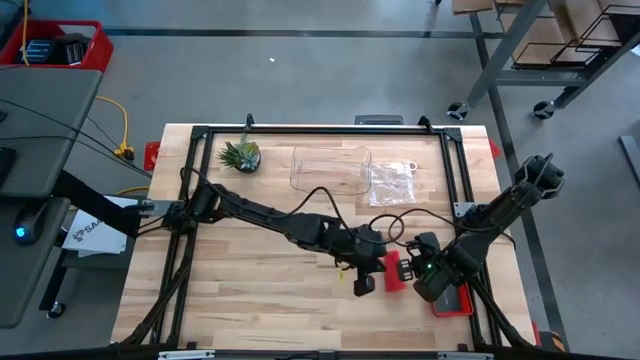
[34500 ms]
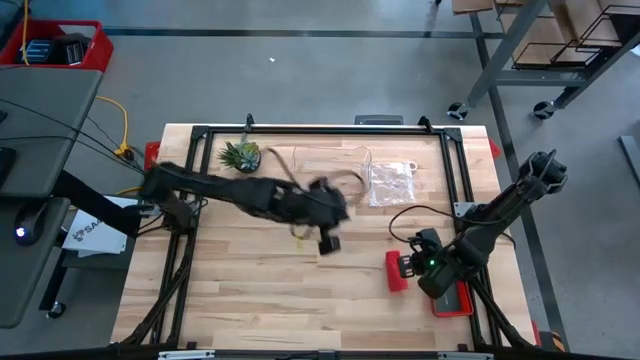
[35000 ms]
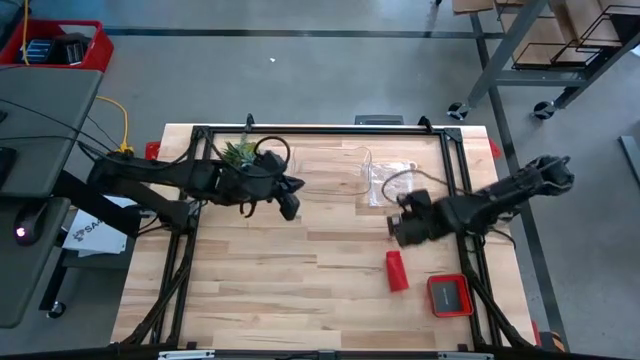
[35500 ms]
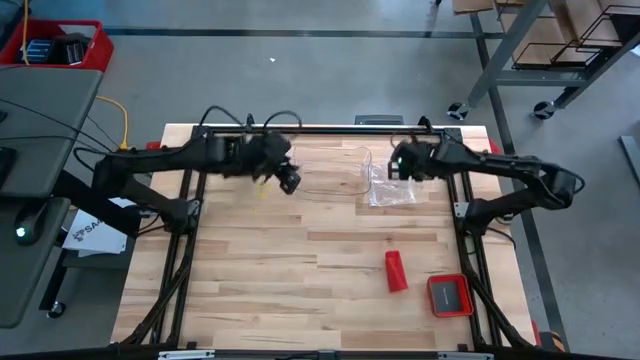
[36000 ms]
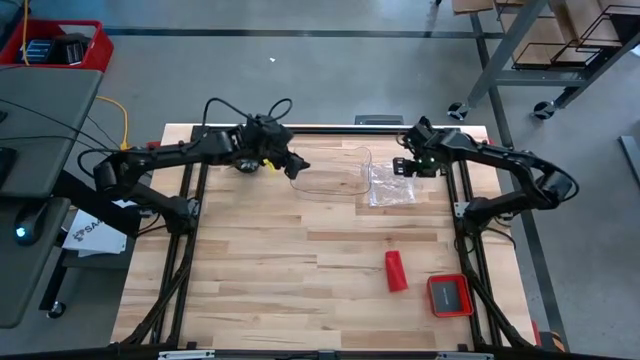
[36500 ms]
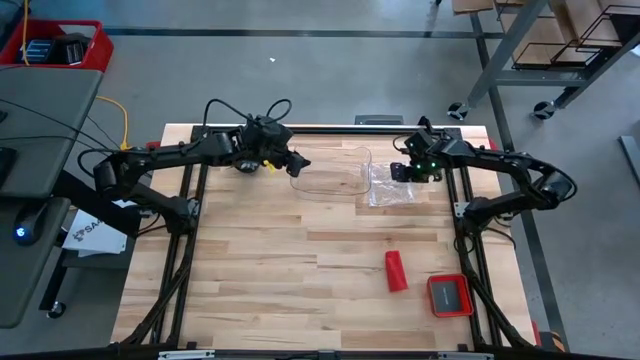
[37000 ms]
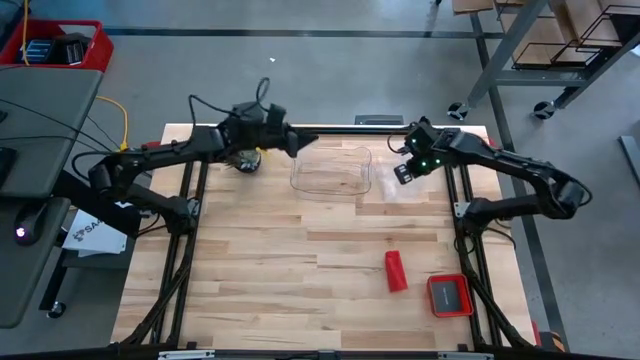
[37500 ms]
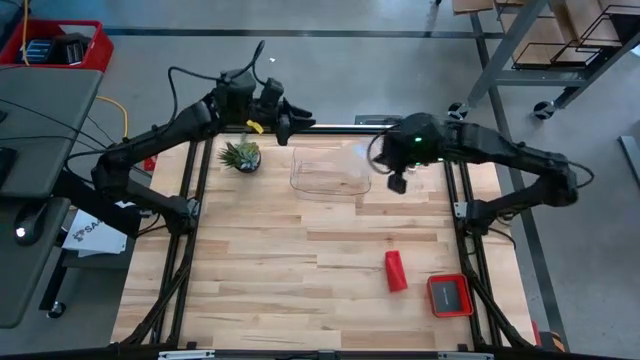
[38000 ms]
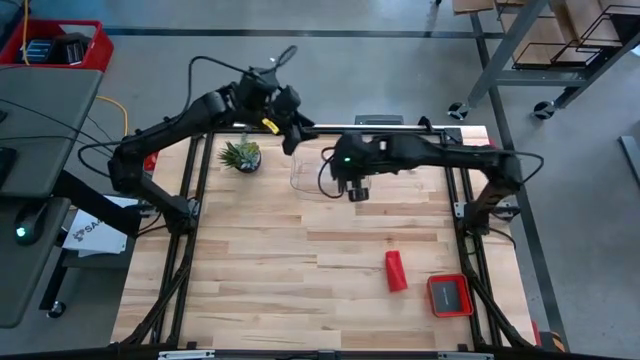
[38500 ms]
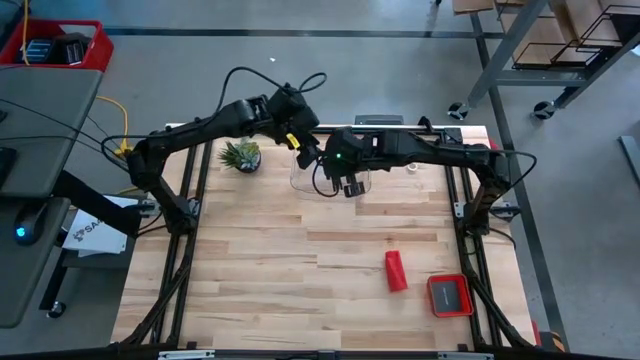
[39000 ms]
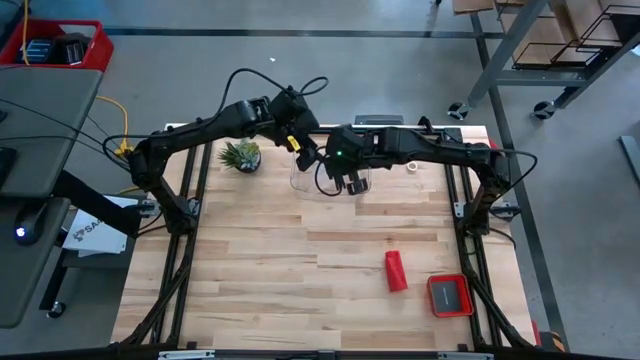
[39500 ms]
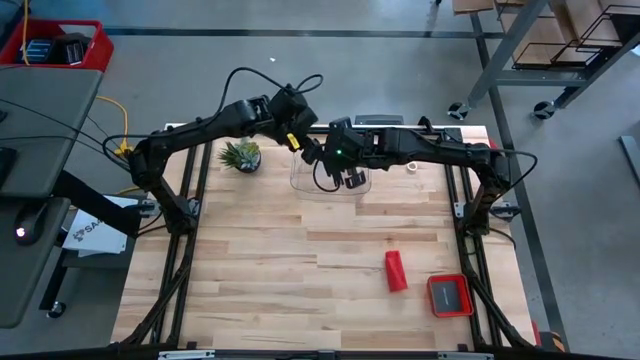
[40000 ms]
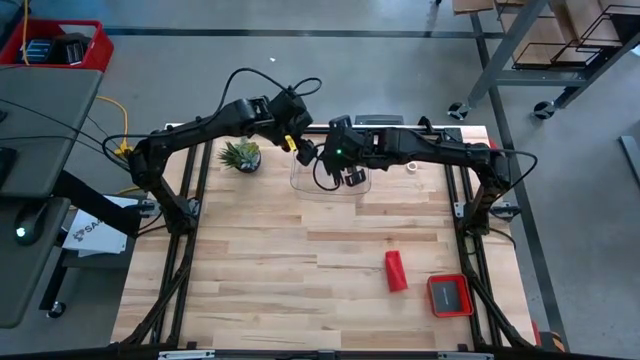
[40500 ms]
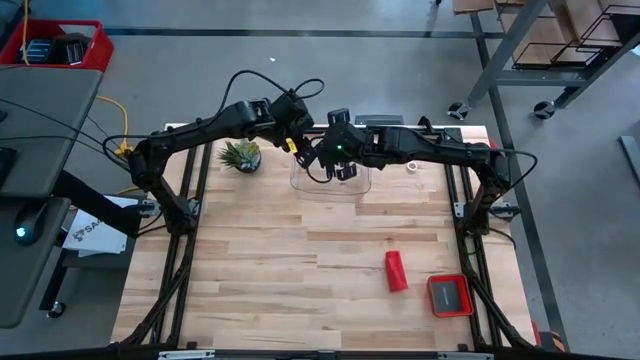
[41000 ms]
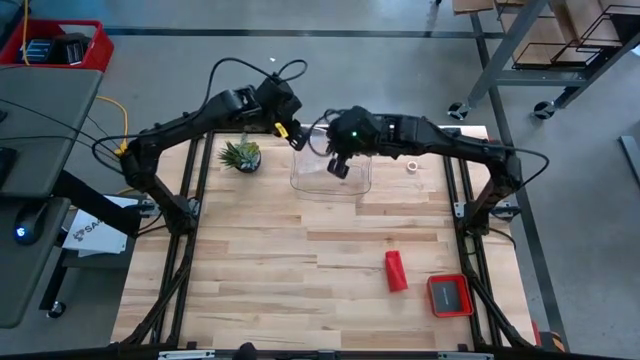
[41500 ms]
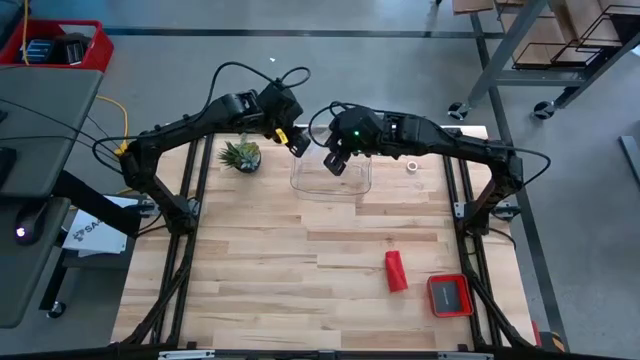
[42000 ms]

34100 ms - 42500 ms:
Task: Roll bandage
Open the transparent zip bag

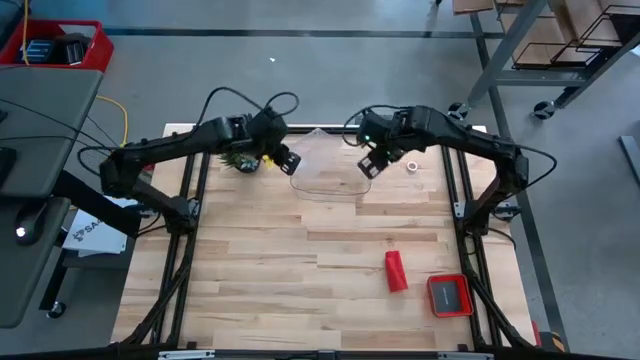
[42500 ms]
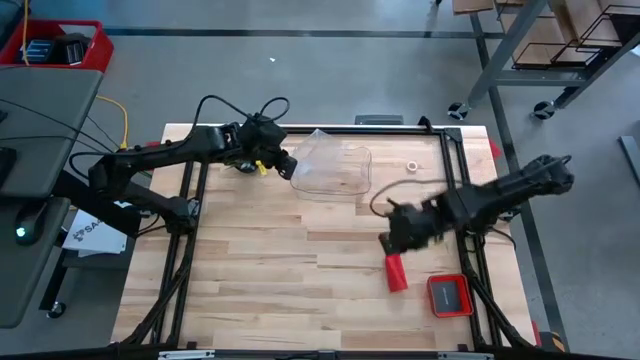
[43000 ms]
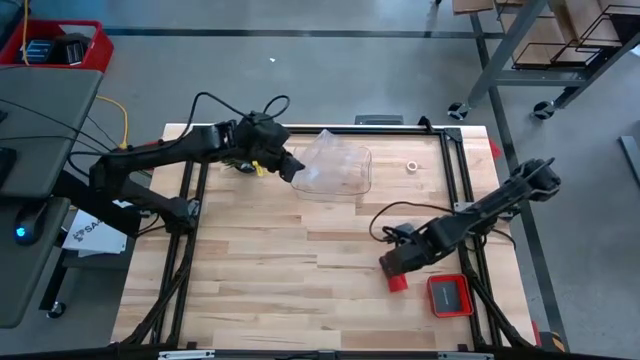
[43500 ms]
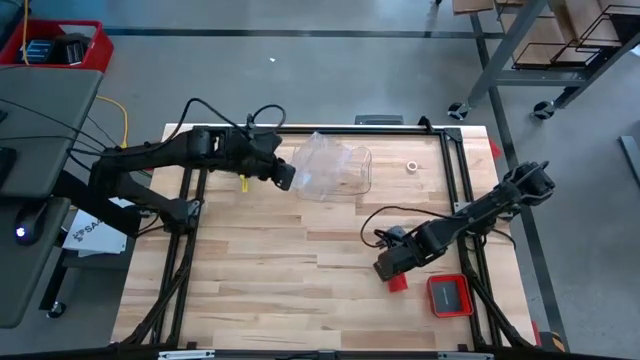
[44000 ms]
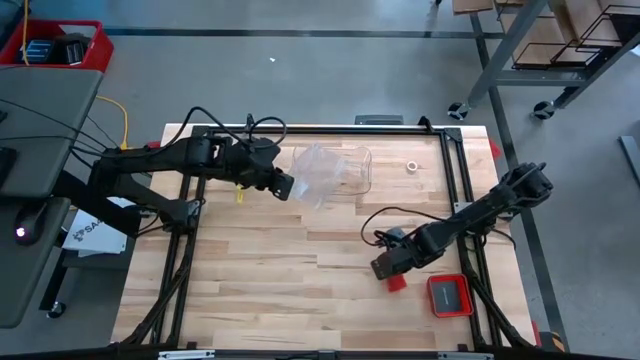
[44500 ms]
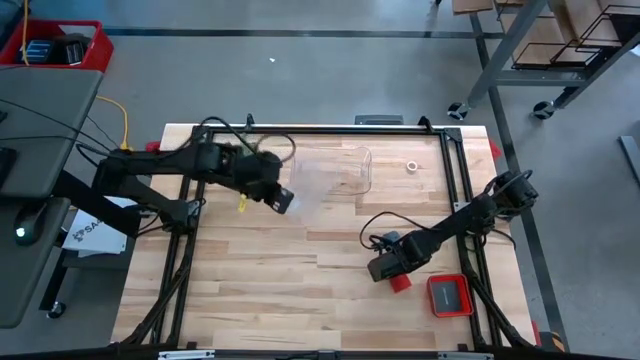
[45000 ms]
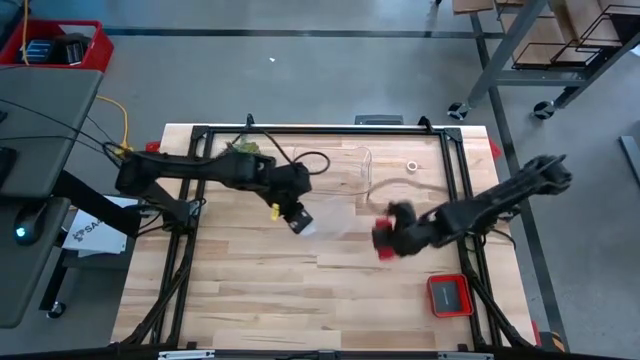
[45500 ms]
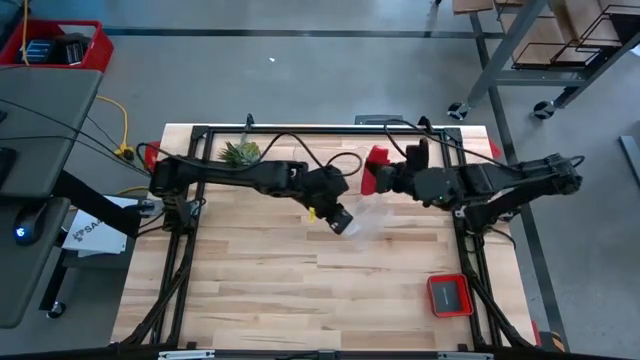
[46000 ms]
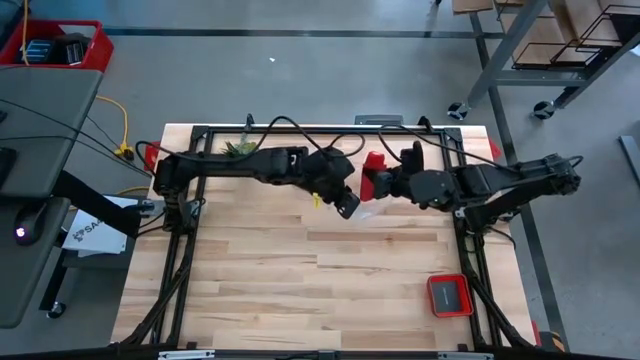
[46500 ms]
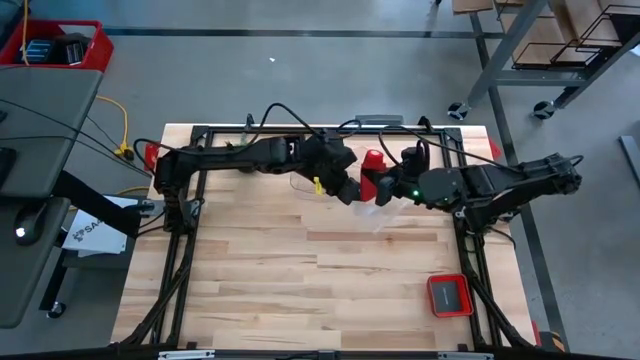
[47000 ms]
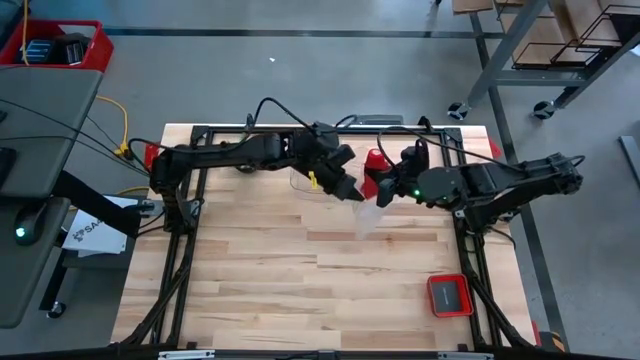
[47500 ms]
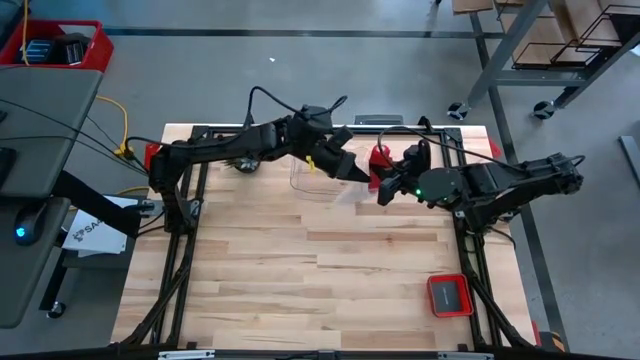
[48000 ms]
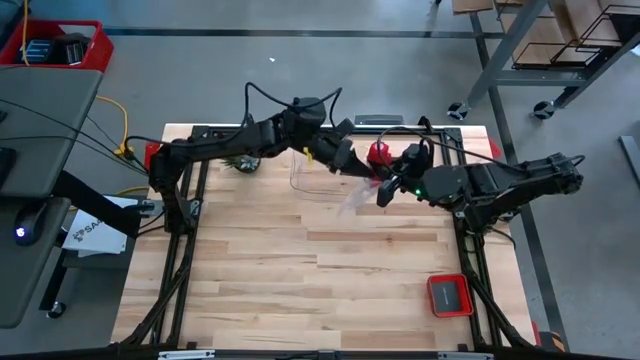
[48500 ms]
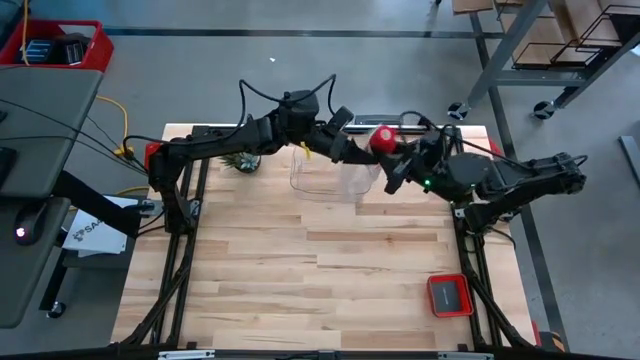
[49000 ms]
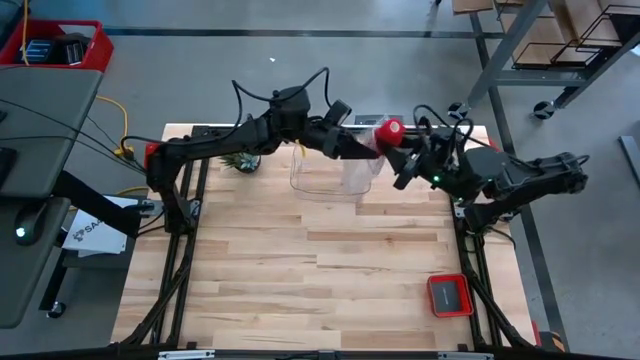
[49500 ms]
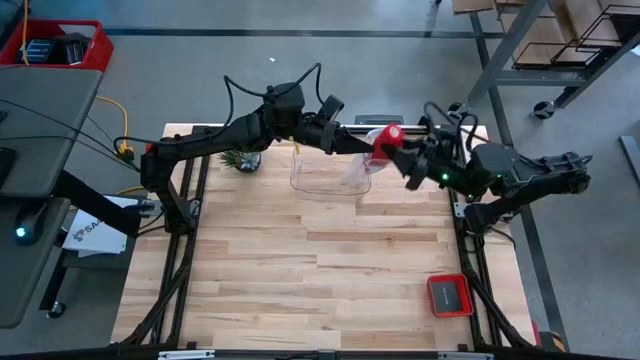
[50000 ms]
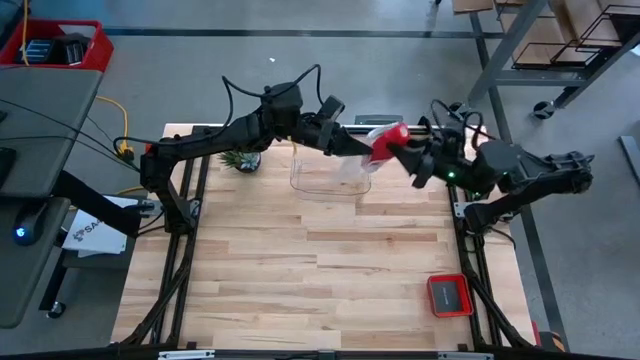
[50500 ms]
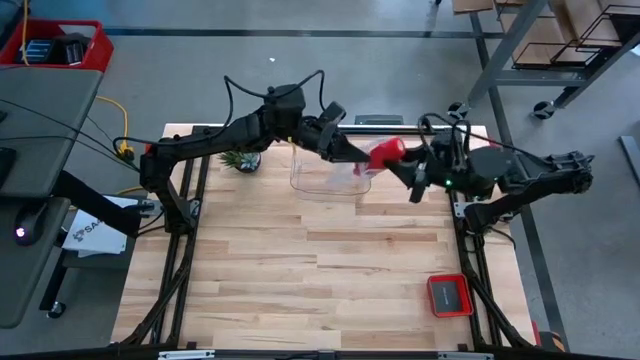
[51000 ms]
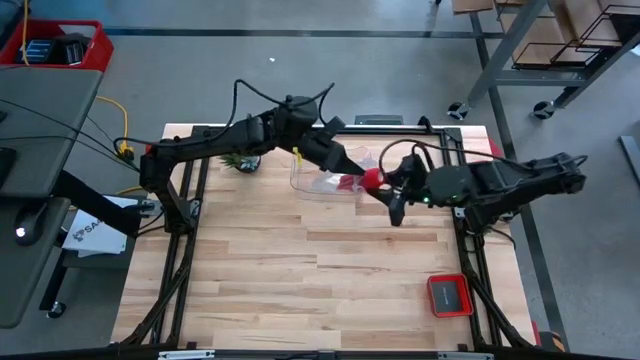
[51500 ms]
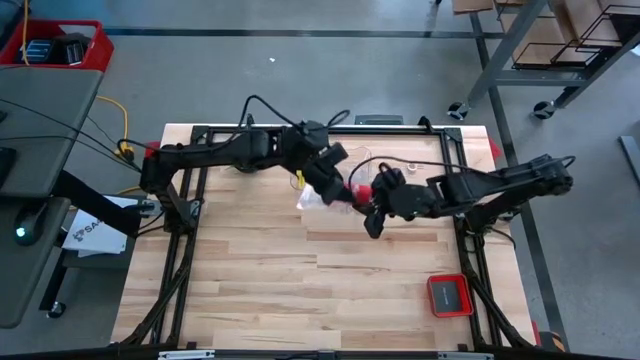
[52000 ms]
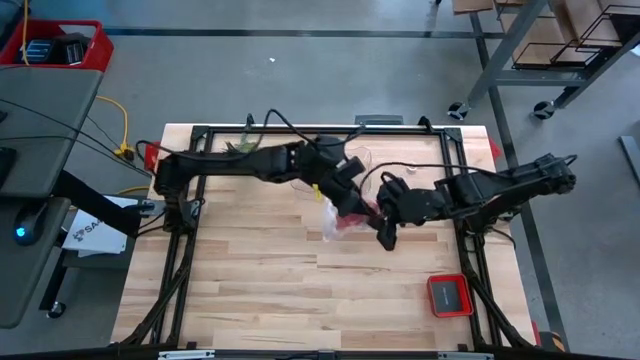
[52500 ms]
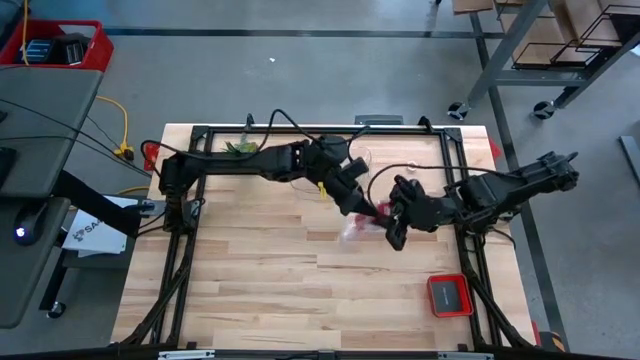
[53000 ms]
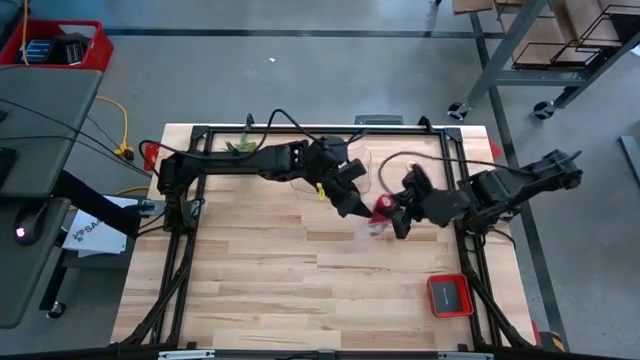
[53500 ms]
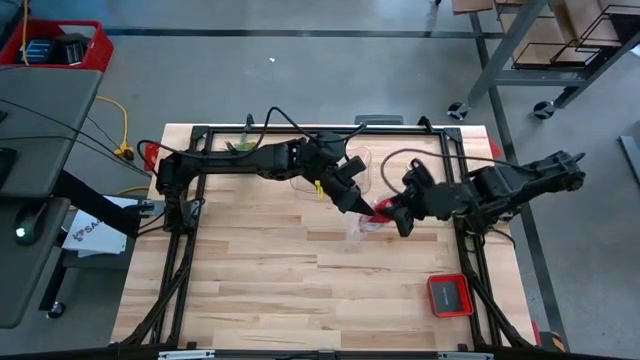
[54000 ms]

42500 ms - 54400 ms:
Put the rolled red bandage into the transparent zip bag

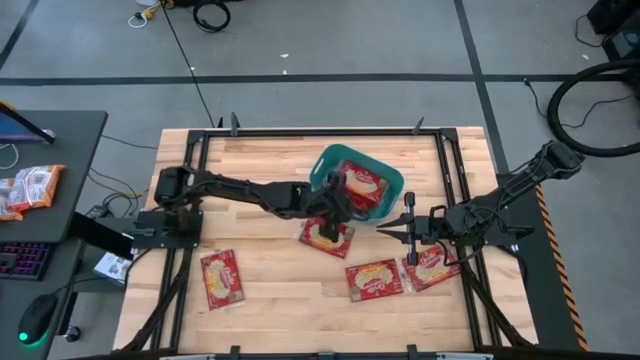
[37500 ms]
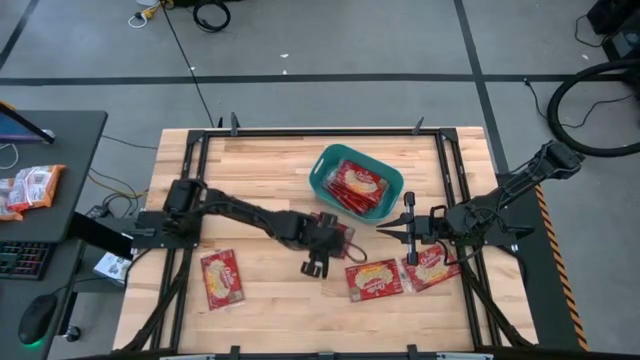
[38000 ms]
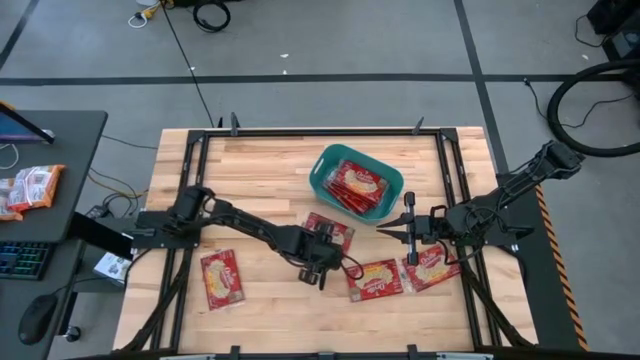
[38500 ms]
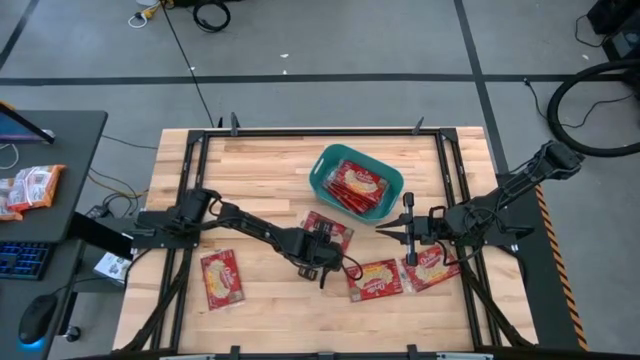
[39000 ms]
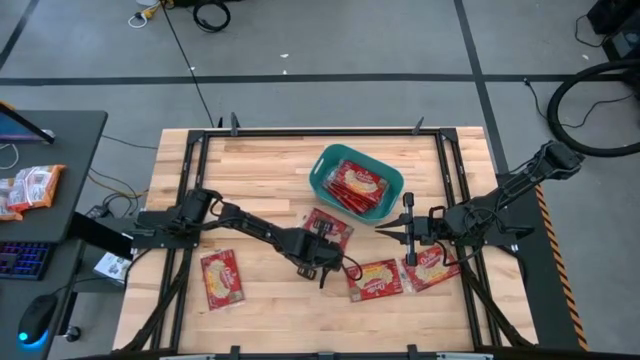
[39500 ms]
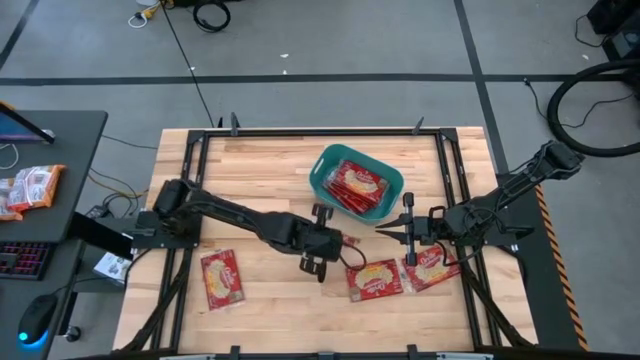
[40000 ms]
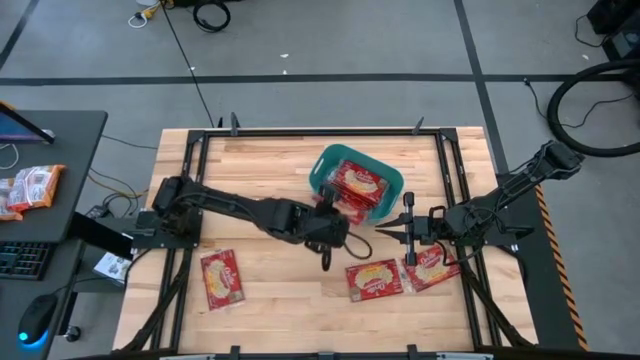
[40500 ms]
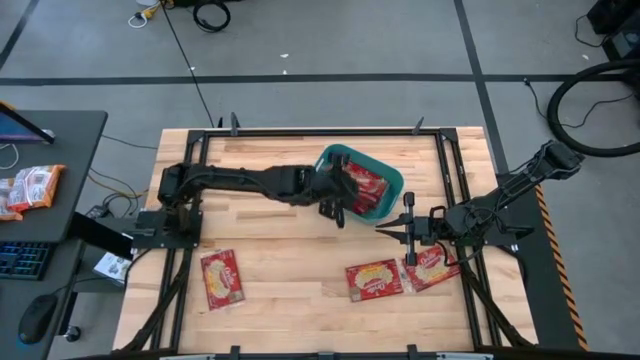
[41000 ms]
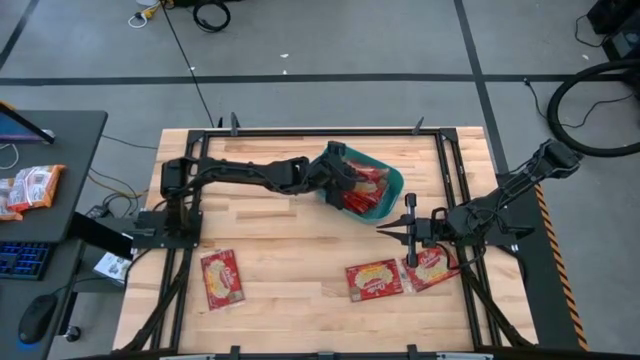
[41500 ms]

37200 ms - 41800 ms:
Task: Sort popcorn bags into baskets
Put the red popcorn bag into the green bin
